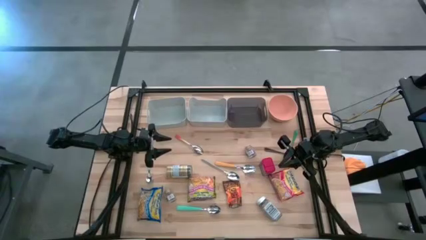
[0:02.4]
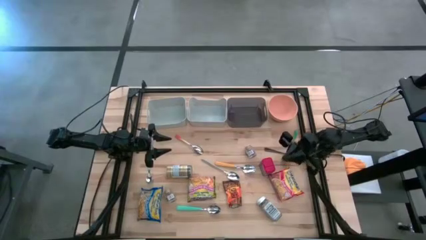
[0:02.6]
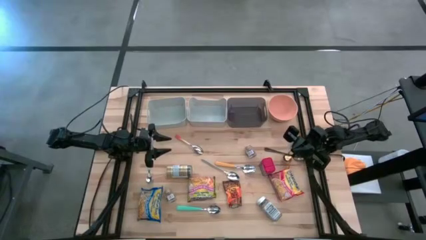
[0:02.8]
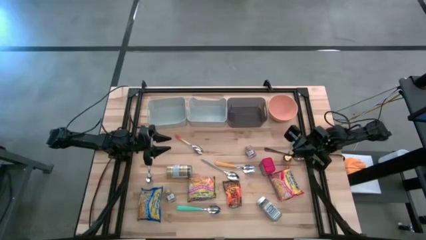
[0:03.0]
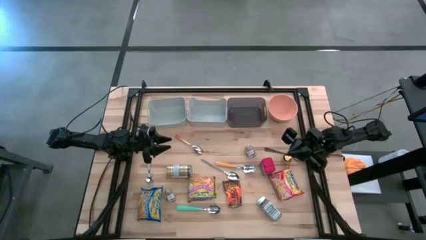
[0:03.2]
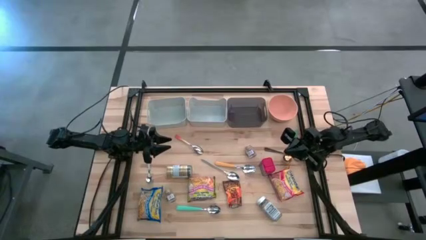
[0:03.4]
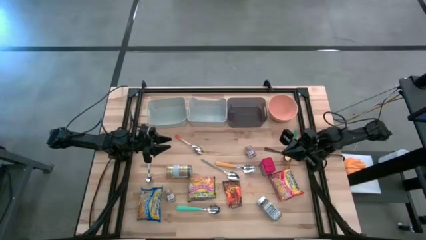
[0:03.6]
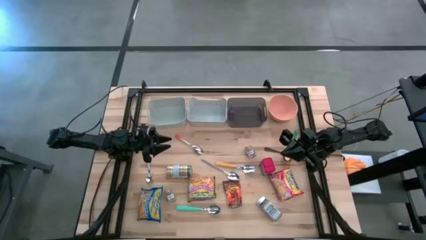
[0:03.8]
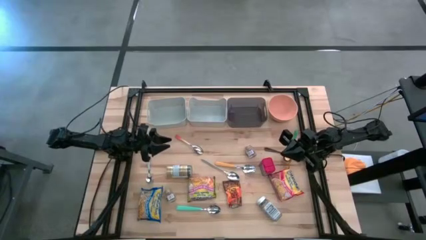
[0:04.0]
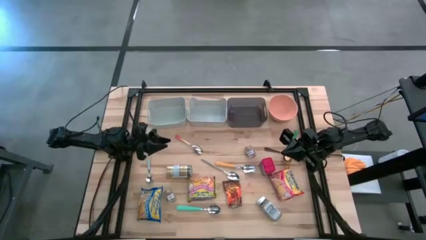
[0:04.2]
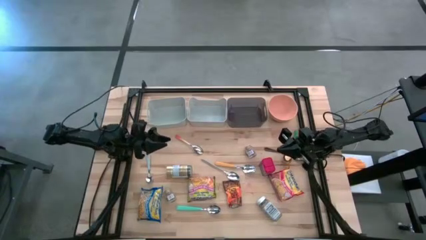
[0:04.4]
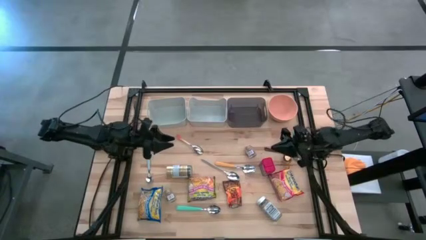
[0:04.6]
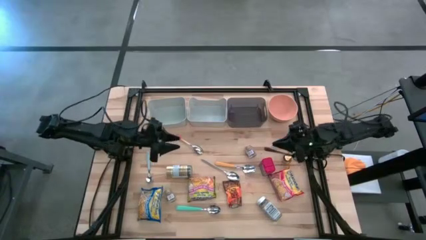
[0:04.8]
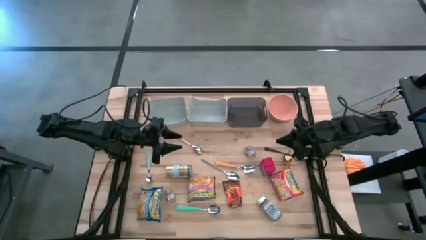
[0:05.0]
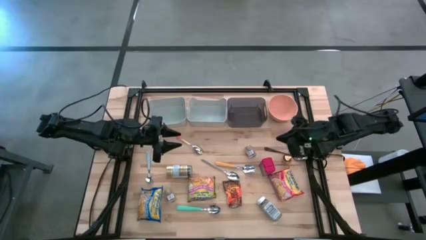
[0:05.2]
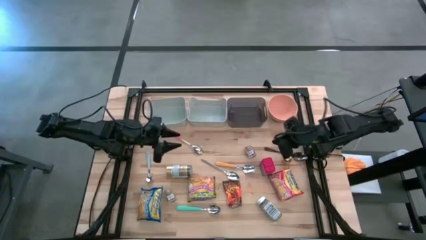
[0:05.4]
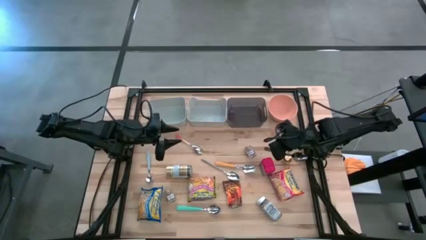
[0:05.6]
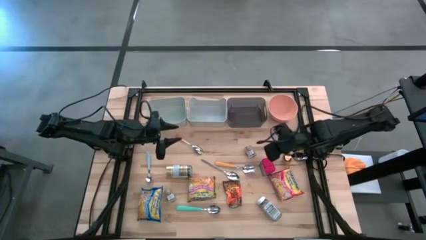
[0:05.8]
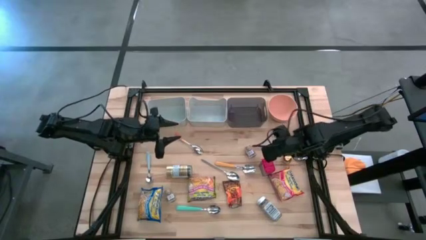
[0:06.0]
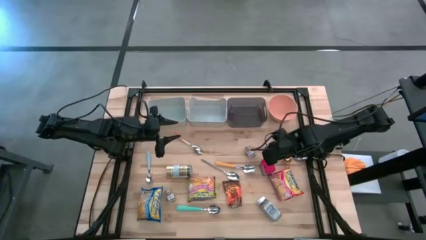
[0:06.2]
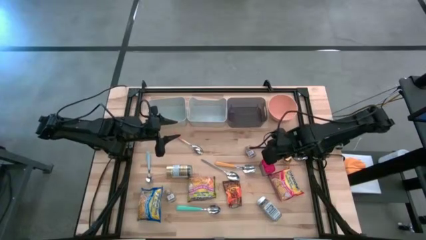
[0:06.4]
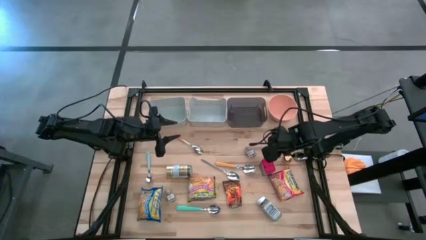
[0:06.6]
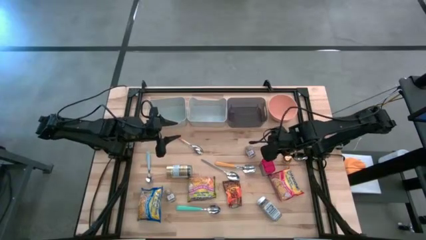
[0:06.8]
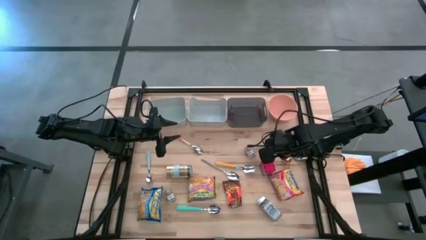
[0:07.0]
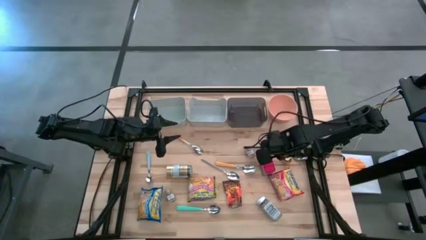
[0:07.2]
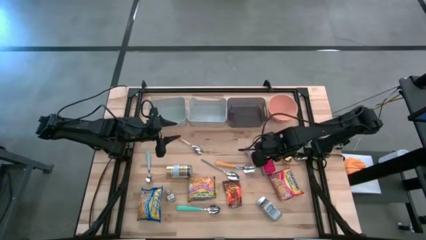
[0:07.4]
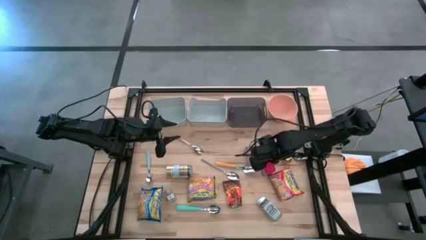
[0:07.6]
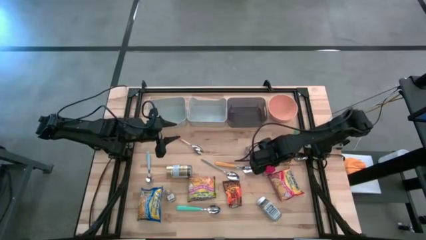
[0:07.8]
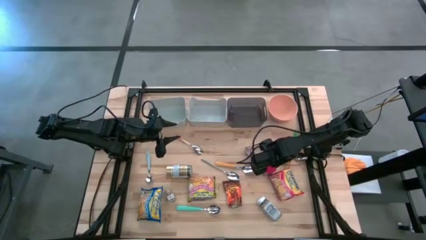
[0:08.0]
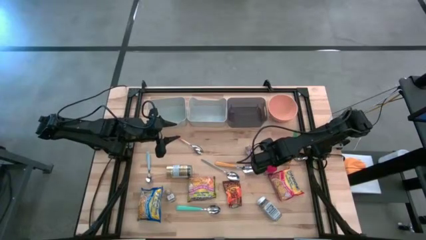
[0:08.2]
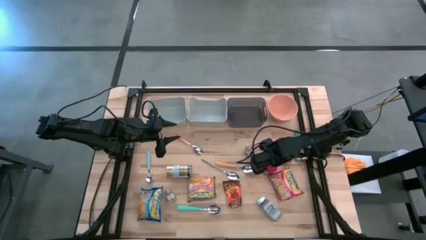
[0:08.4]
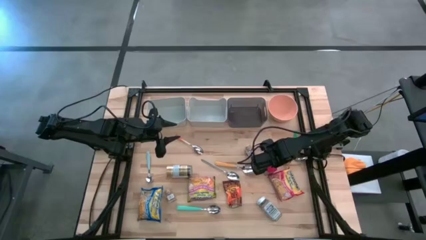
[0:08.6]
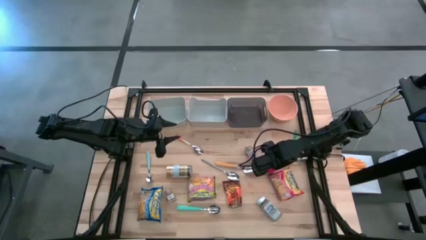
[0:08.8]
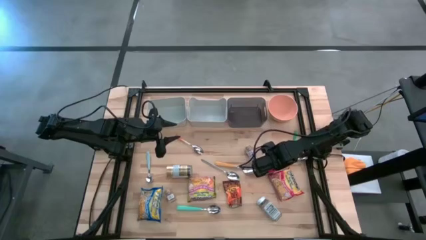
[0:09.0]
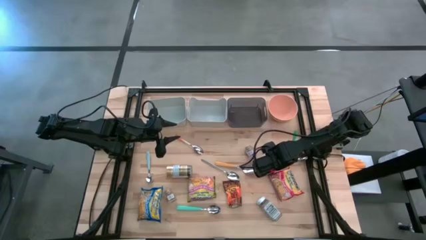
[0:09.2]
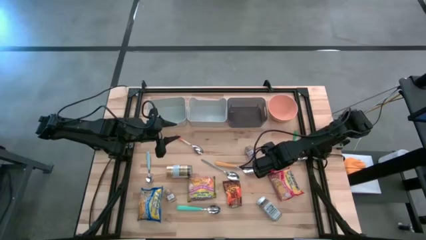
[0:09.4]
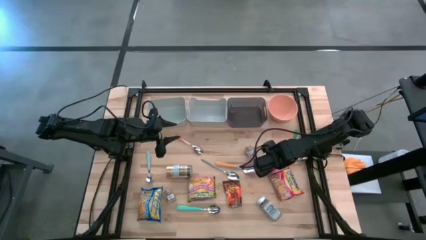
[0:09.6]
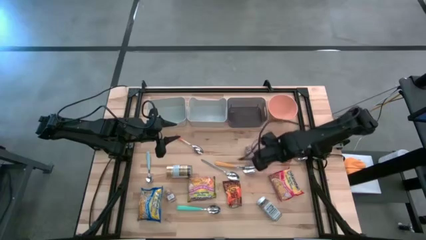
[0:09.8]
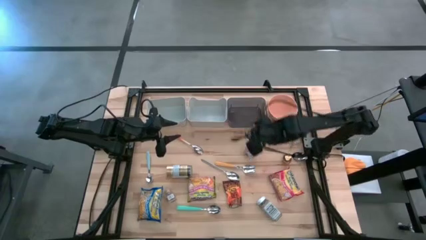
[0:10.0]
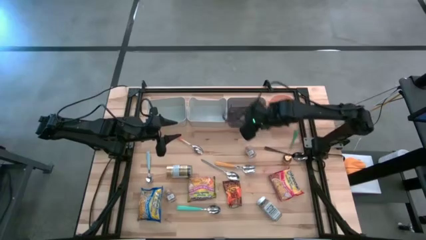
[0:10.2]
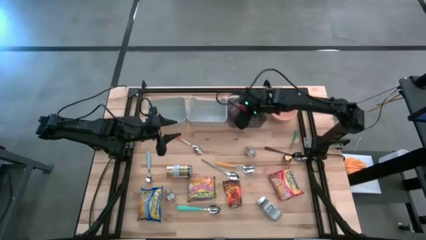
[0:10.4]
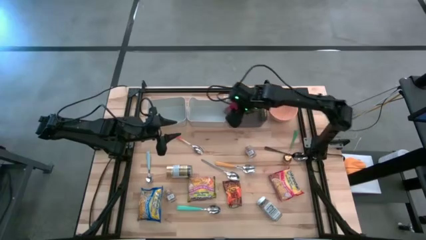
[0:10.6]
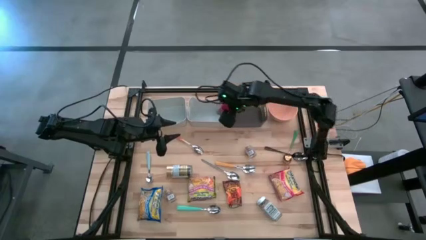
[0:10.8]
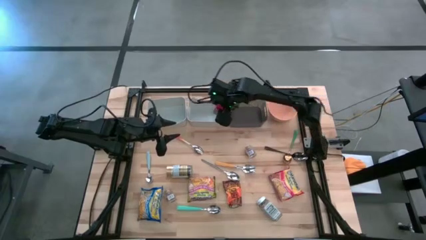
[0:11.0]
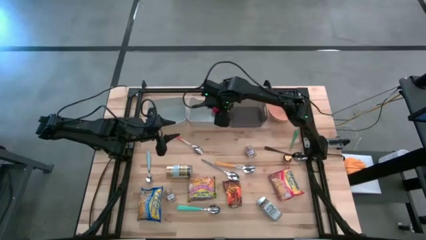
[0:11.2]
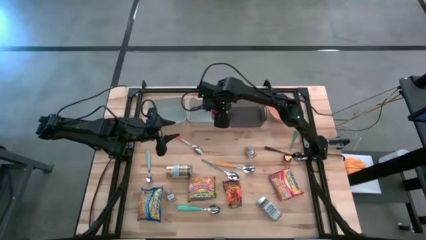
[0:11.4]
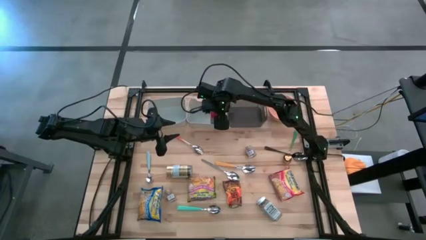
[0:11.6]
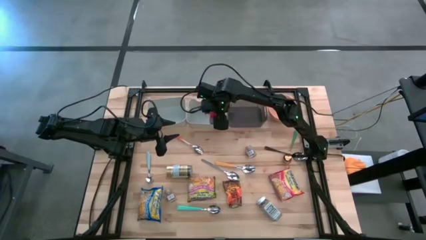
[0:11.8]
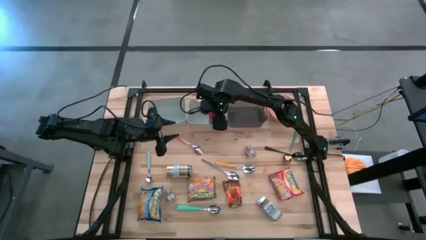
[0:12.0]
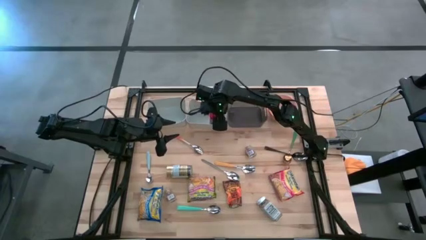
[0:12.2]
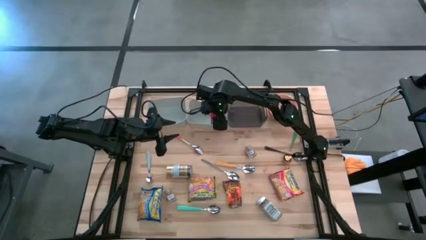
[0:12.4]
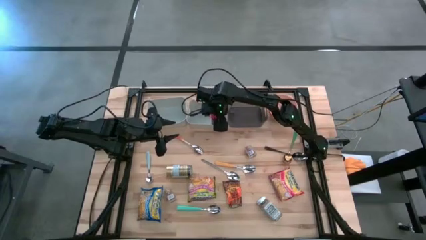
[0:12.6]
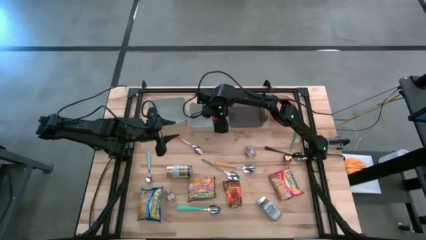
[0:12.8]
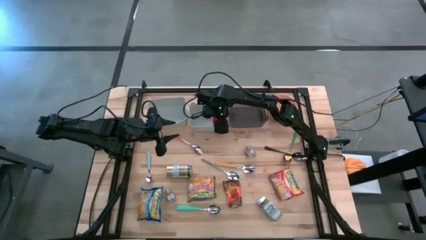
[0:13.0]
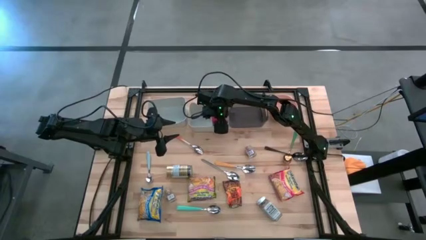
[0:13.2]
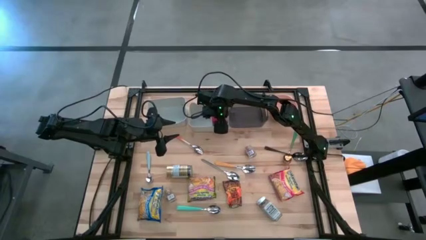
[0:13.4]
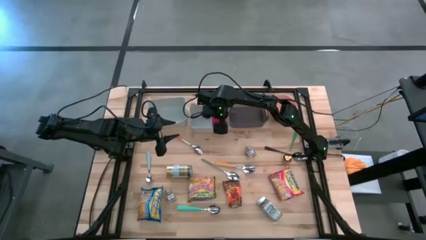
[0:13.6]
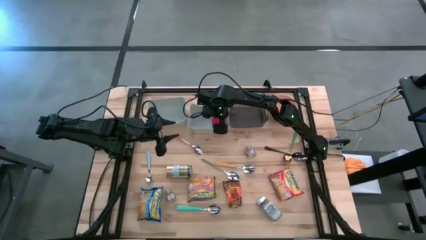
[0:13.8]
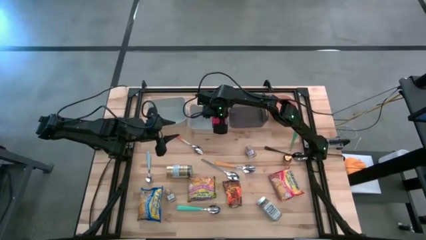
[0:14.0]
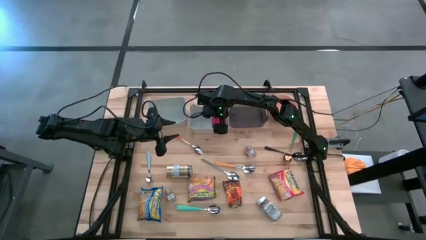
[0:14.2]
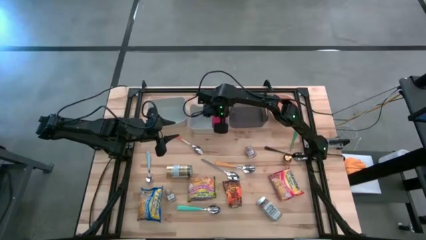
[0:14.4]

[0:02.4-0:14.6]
Put the red seasoning can into the right gray bin
